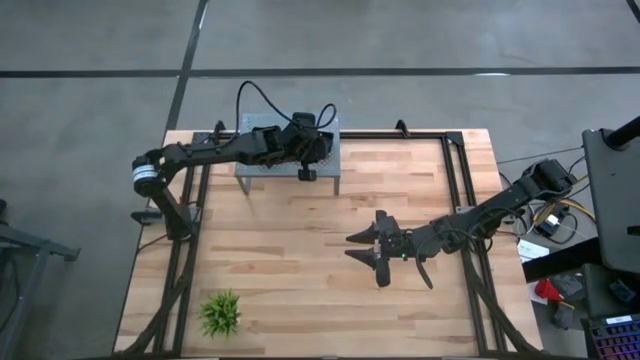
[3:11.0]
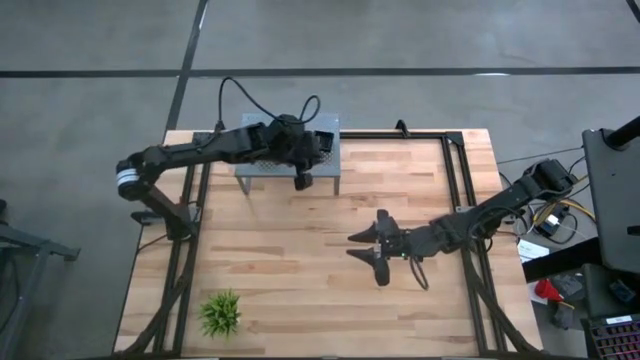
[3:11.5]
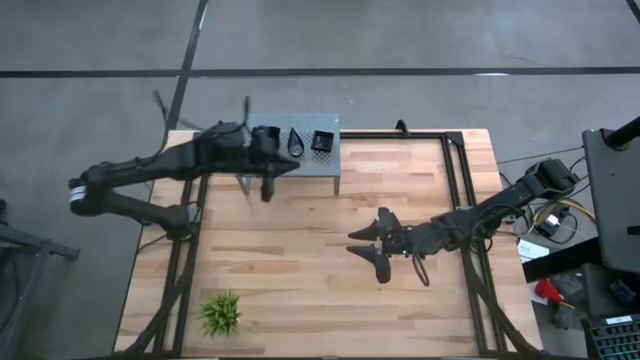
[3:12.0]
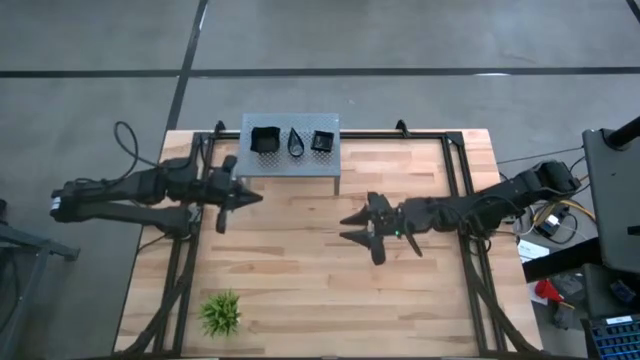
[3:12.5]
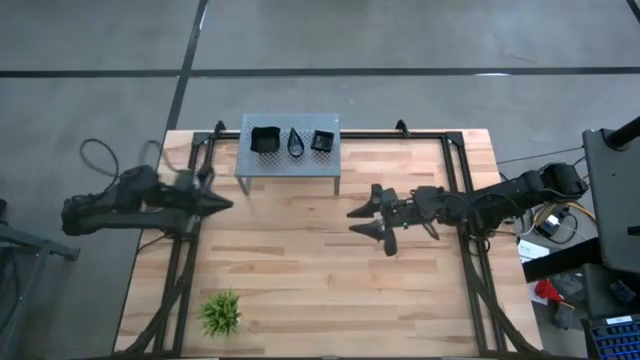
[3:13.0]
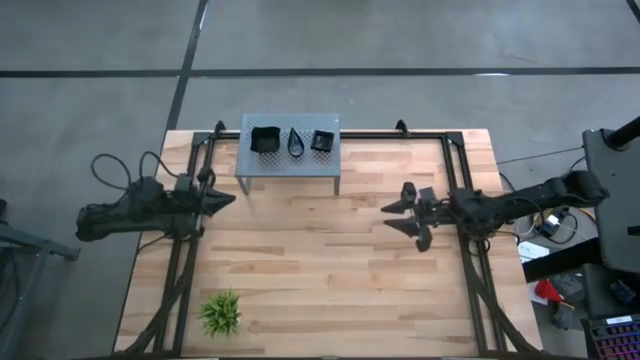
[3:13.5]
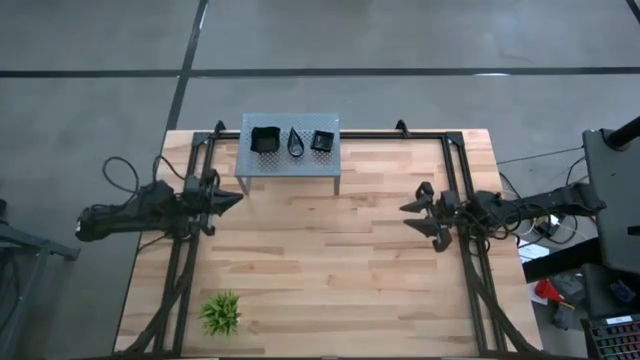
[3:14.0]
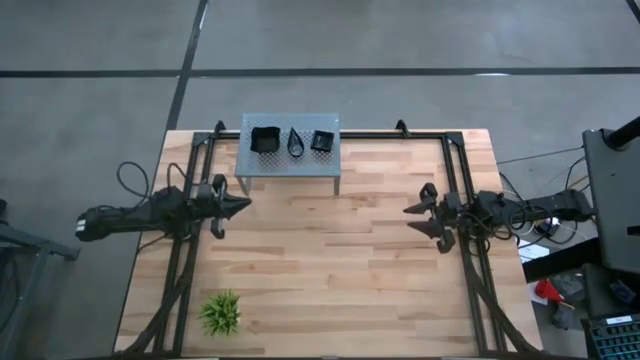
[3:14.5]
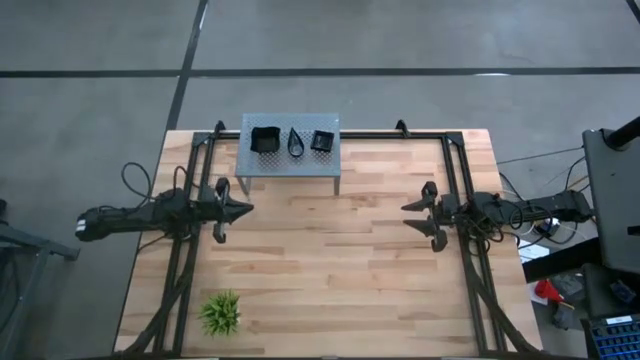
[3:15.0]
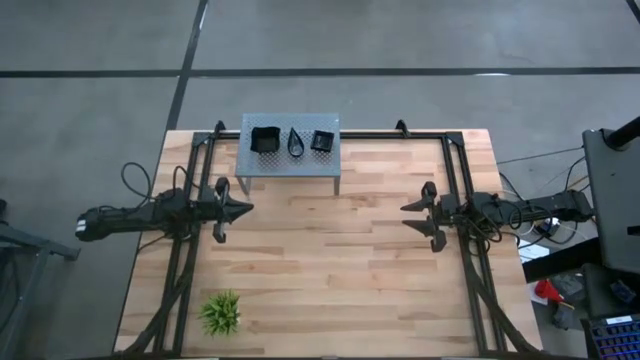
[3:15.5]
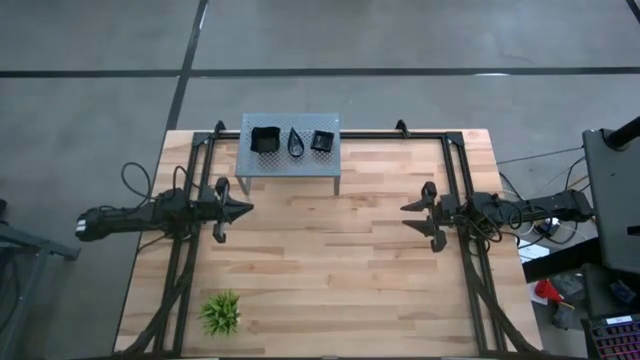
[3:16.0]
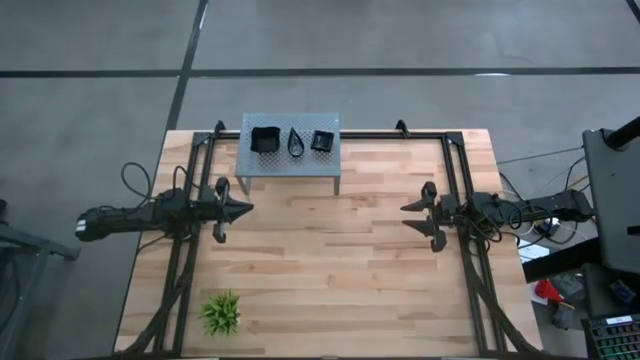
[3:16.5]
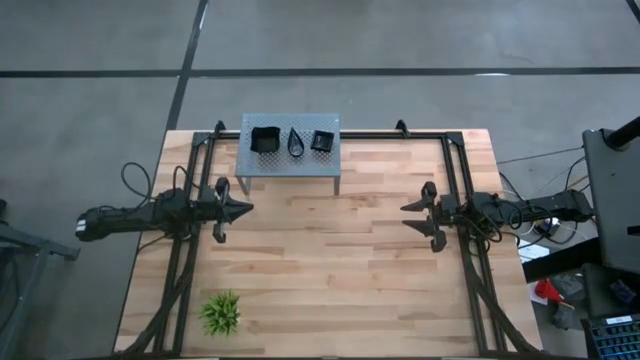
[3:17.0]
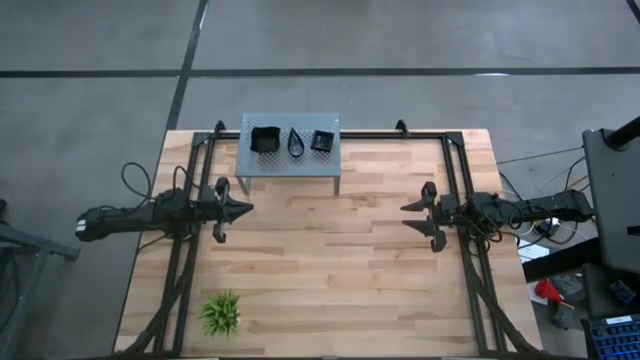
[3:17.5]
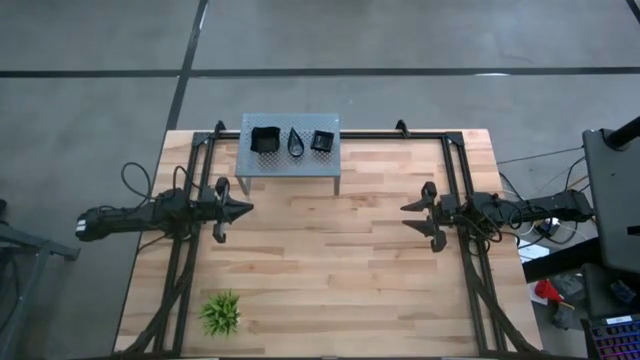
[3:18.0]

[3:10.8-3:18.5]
Task: Pick & Place Mini shaped plates
Return to Home Position

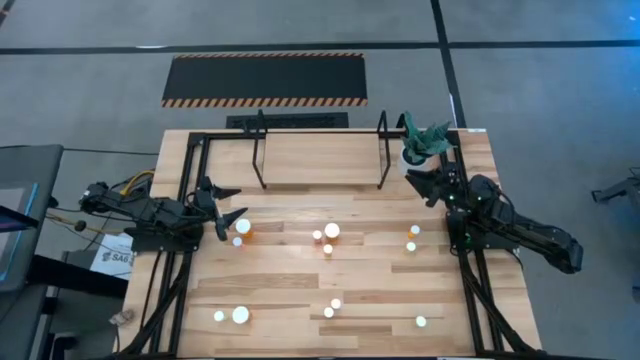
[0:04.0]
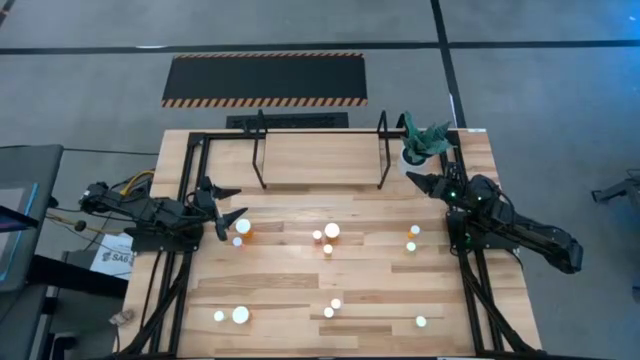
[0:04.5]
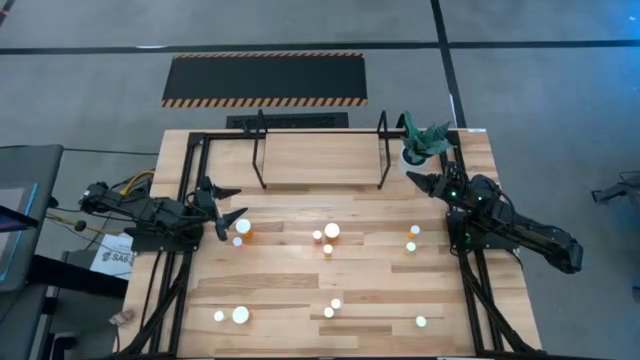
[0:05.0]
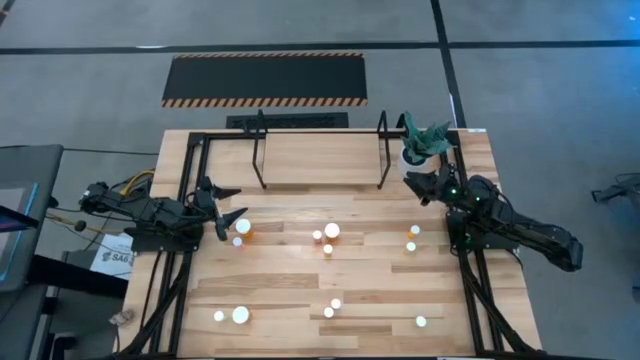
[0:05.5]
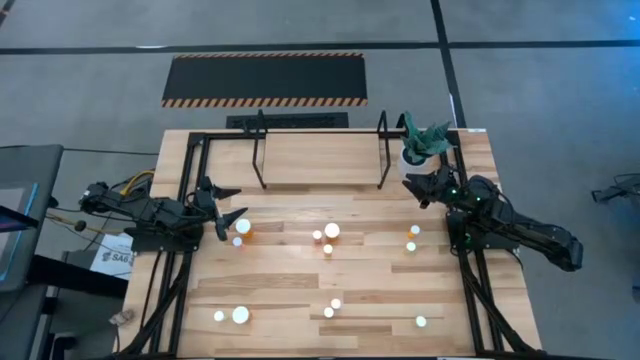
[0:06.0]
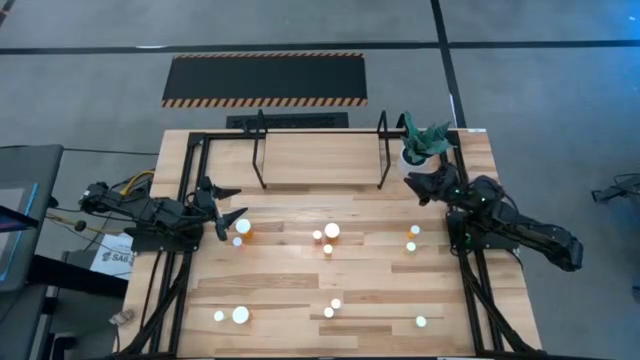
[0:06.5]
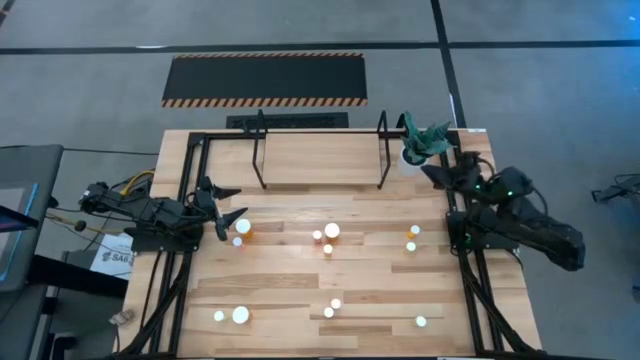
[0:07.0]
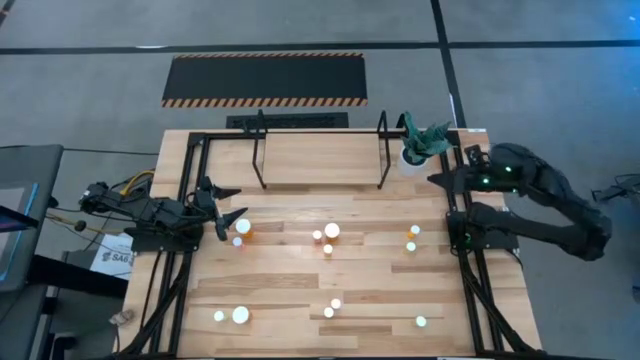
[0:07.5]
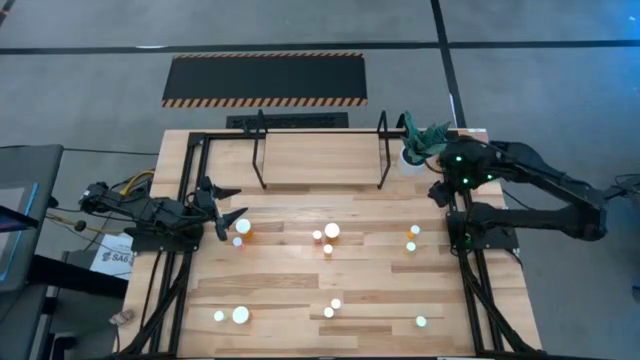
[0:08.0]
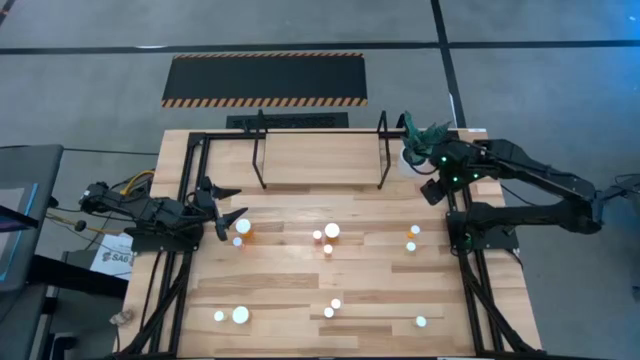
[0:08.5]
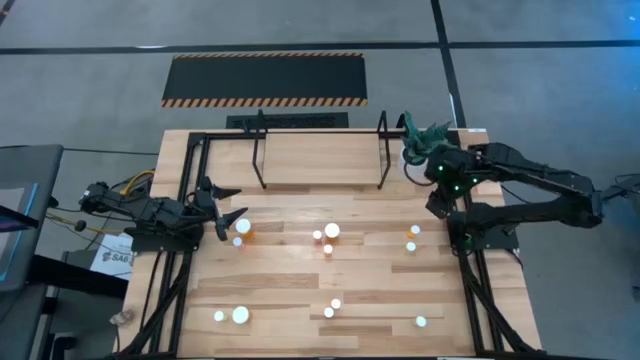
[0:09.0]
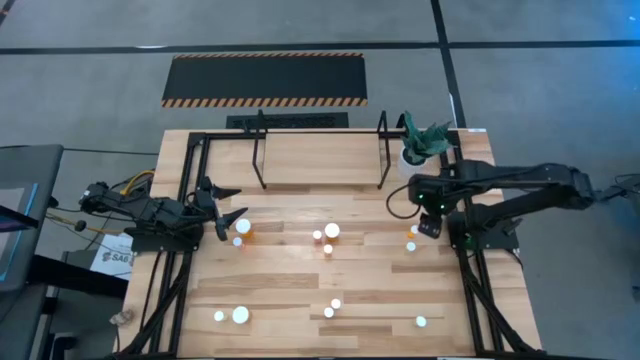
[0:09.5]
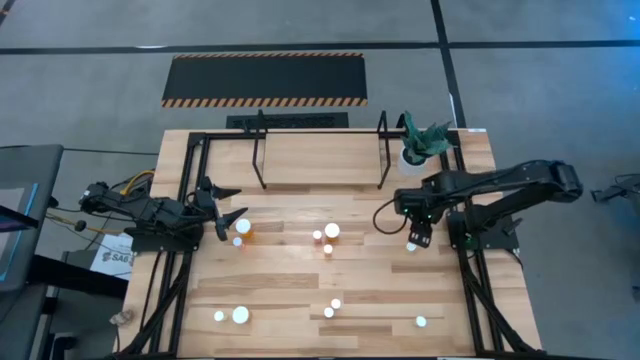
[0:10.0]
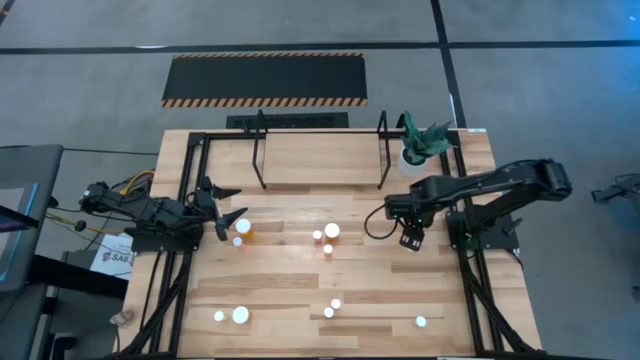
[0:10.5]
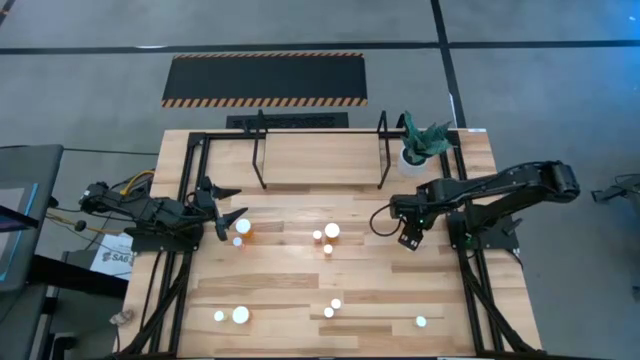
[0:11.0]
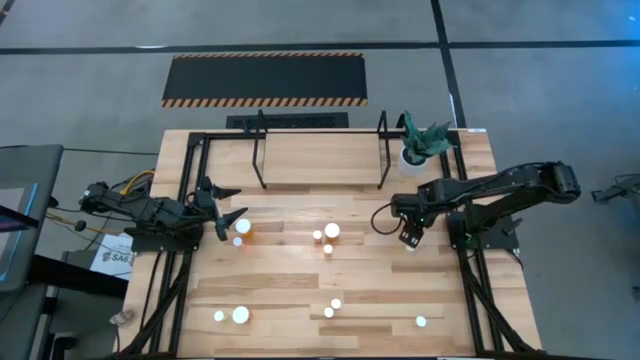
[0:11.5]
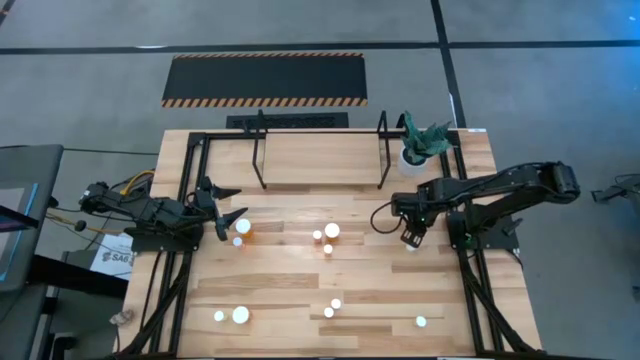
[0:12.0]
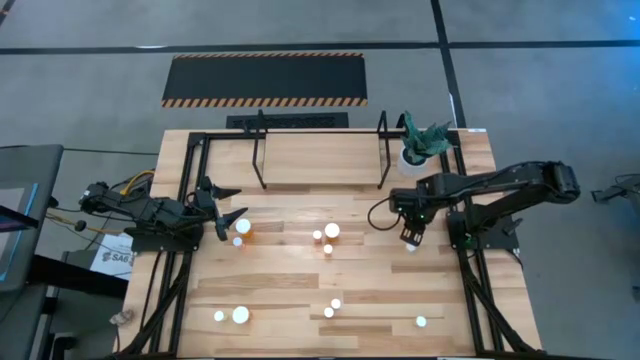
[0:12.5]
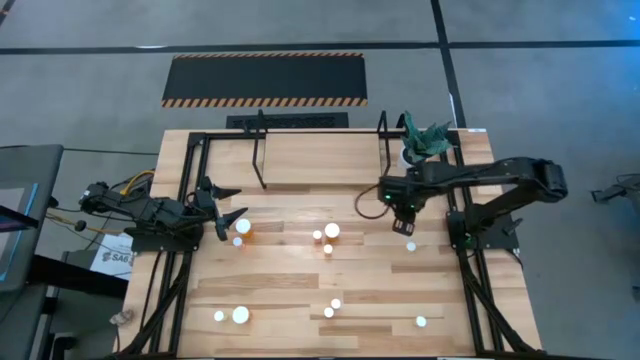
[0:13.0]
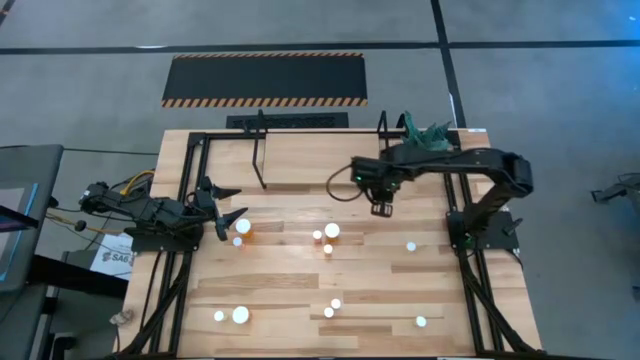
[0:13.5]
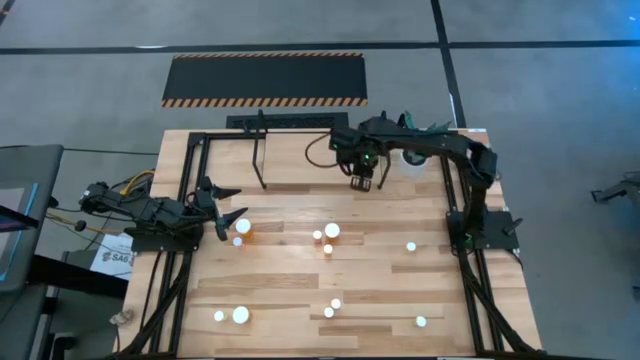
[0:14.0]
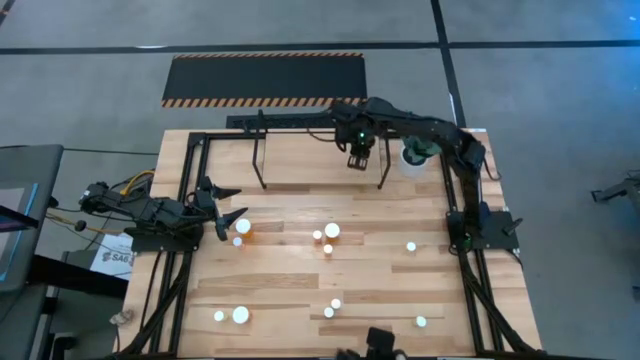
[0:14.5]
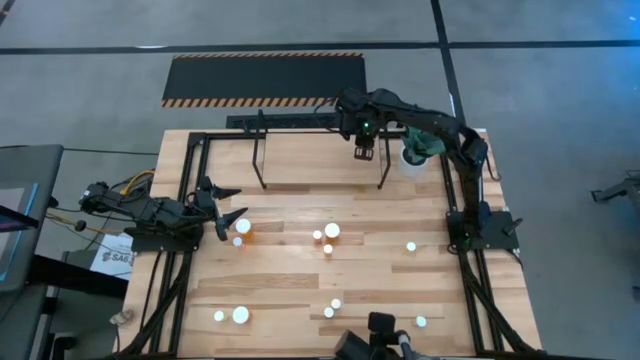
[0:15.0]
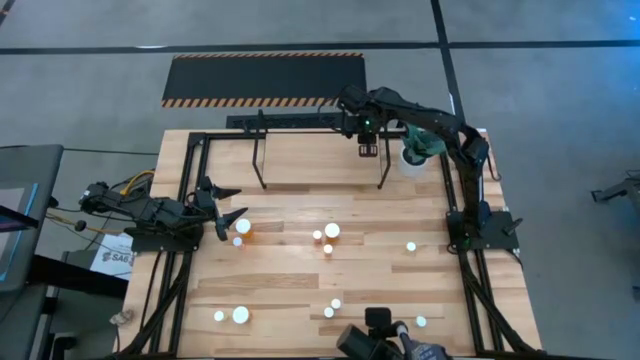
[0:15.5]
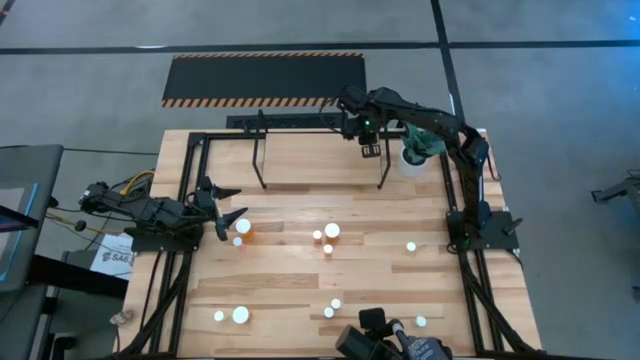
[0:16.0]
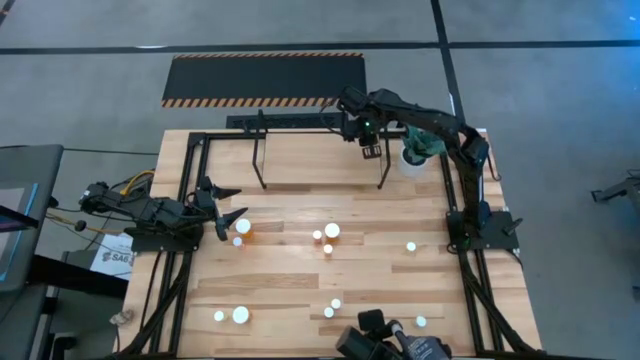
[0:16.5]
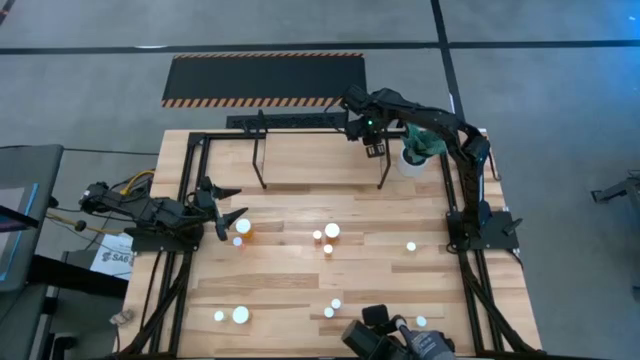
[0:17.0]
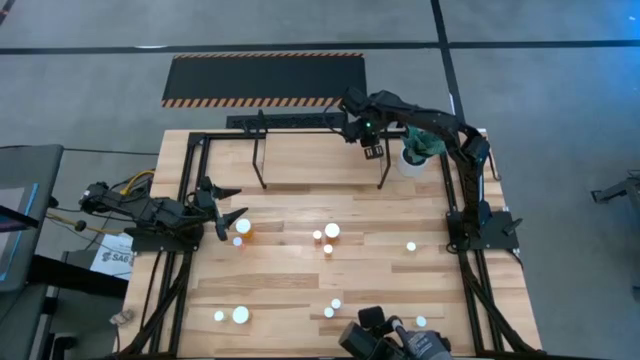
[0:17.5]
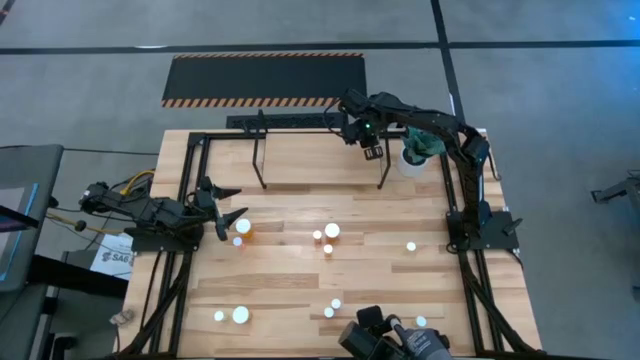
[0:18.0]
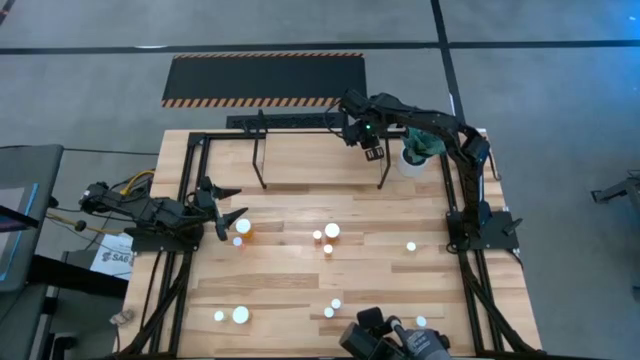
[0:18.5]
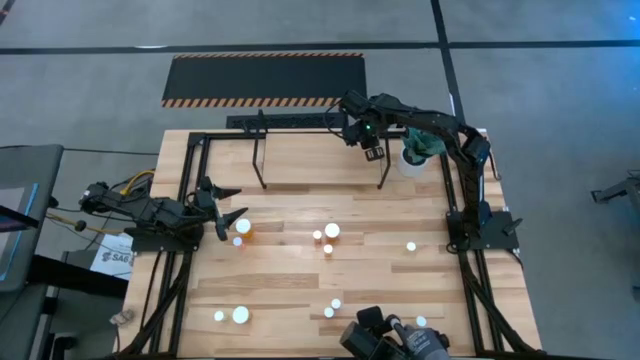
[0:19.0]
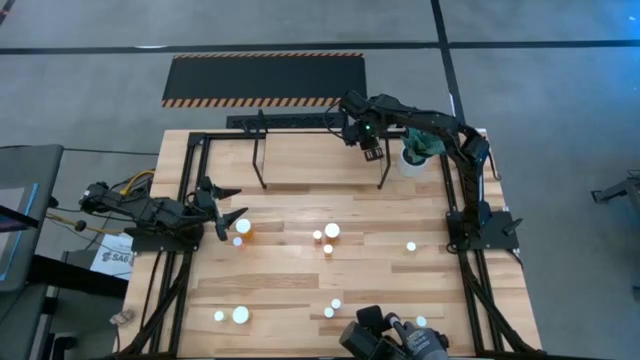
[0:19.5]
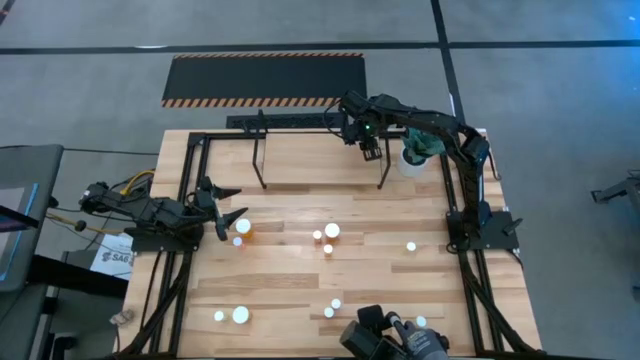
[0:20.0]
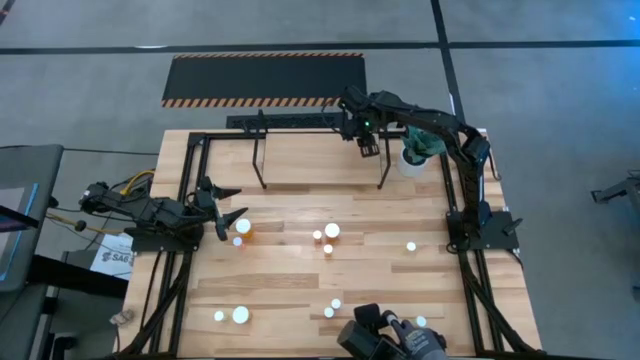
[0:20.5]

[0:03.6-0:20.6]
Task: Pick and place medicine bottles onto shelf by color
Put the top small orange pill bottle on the shelf
